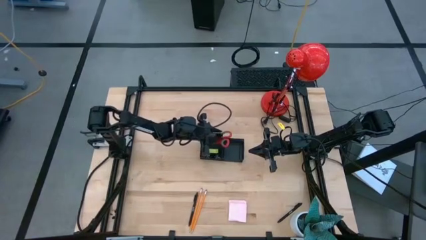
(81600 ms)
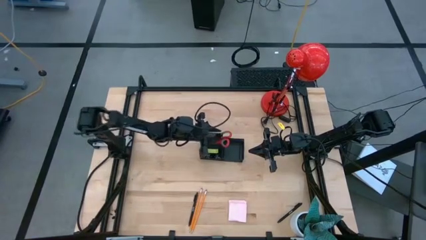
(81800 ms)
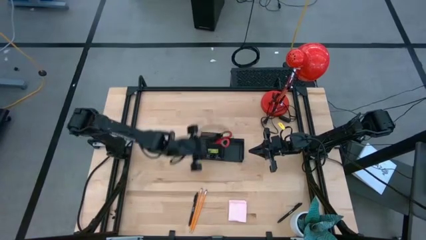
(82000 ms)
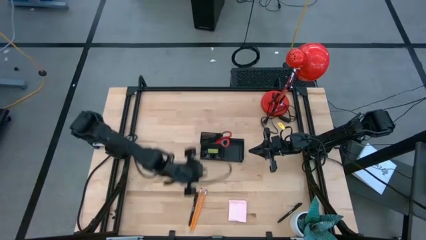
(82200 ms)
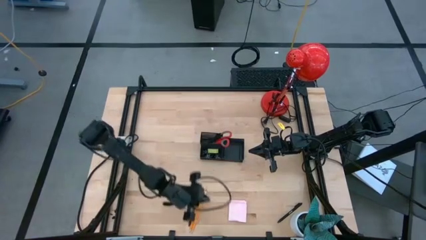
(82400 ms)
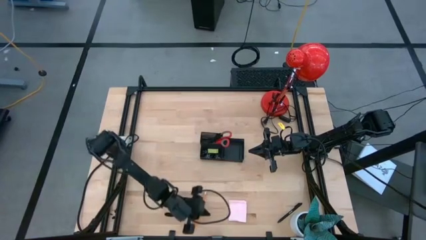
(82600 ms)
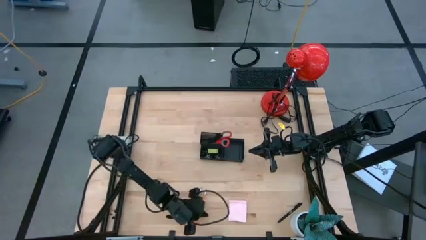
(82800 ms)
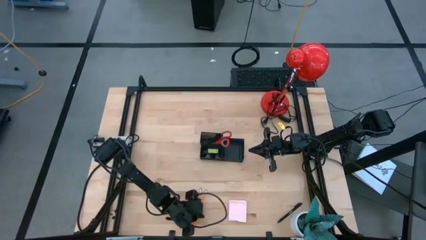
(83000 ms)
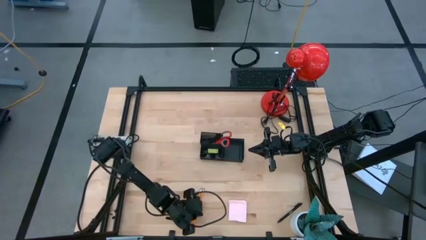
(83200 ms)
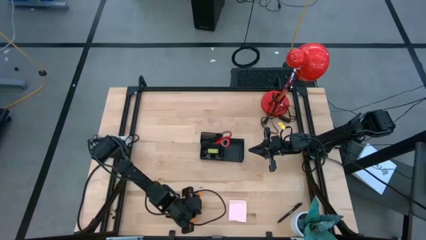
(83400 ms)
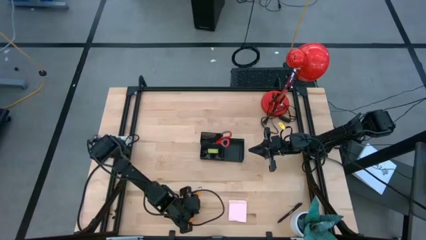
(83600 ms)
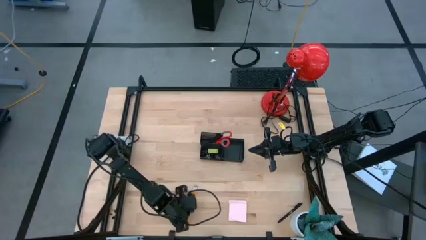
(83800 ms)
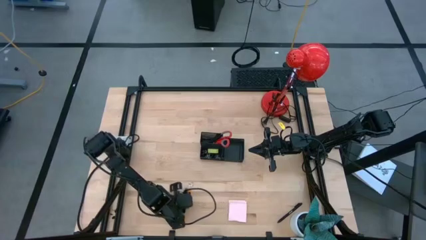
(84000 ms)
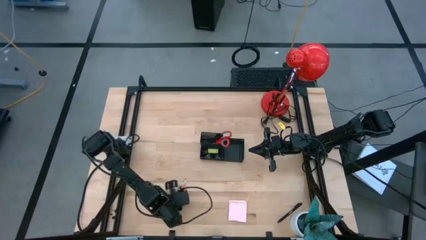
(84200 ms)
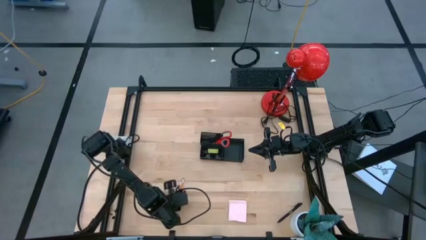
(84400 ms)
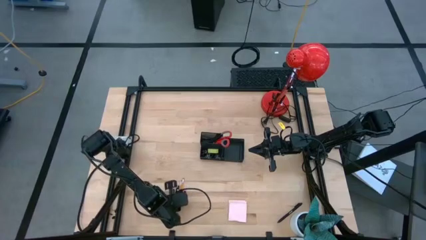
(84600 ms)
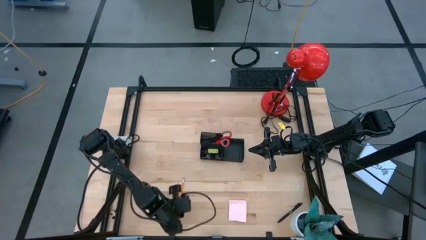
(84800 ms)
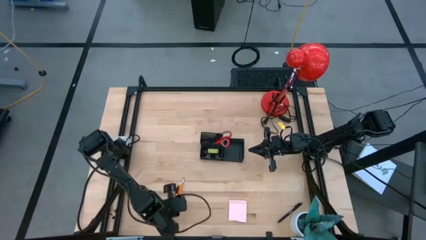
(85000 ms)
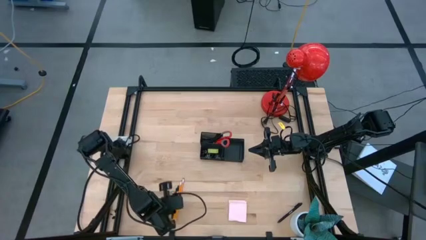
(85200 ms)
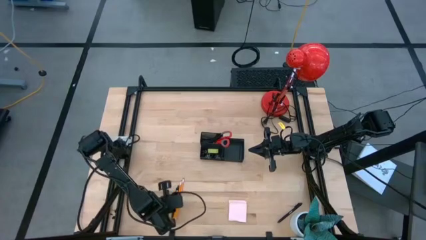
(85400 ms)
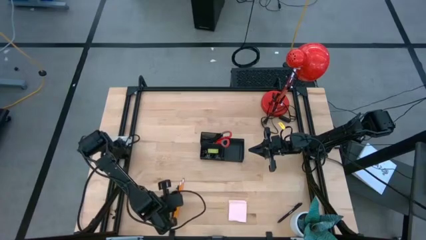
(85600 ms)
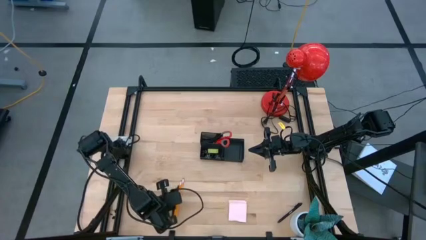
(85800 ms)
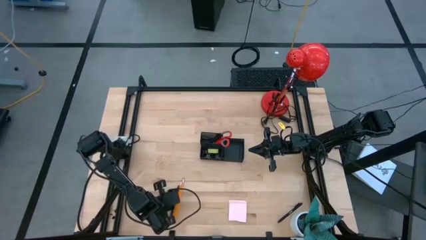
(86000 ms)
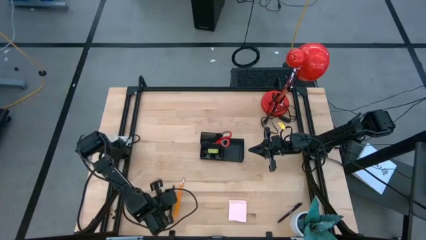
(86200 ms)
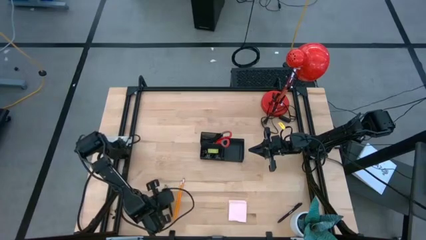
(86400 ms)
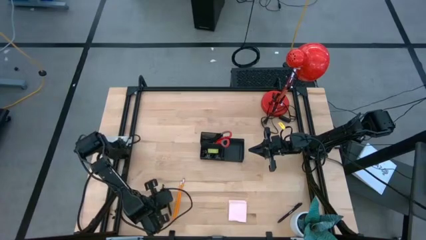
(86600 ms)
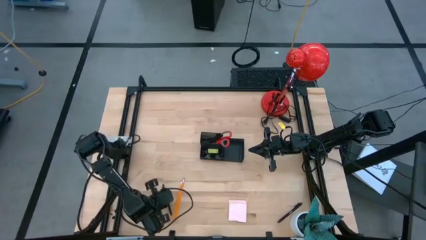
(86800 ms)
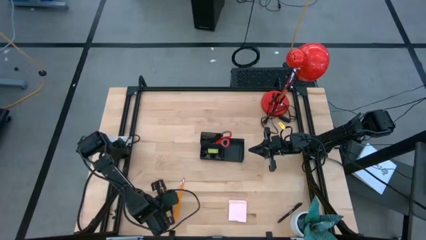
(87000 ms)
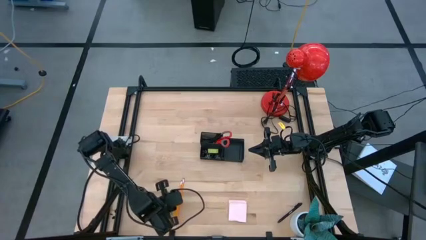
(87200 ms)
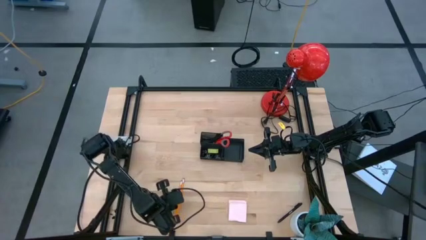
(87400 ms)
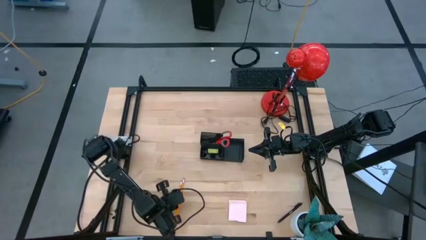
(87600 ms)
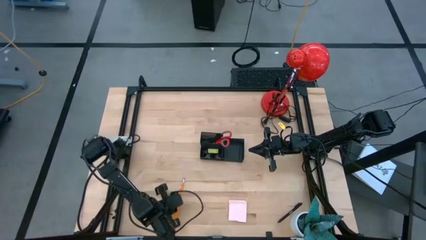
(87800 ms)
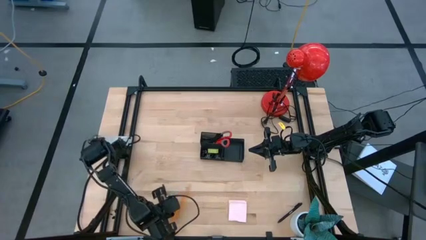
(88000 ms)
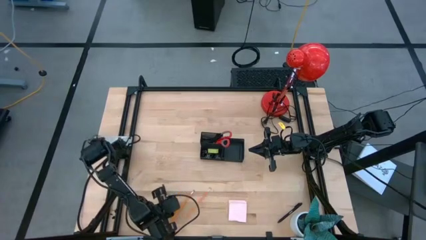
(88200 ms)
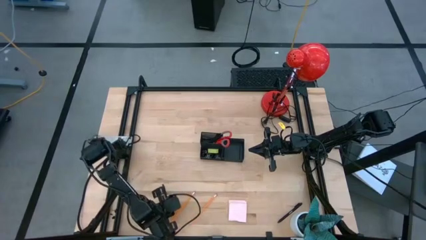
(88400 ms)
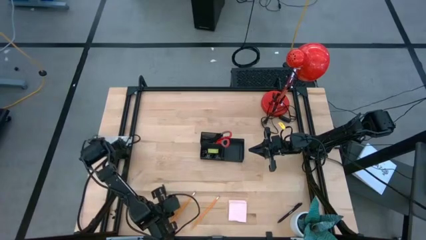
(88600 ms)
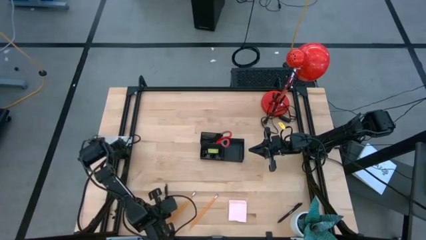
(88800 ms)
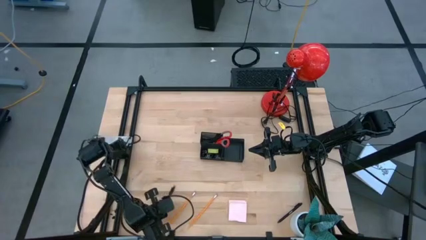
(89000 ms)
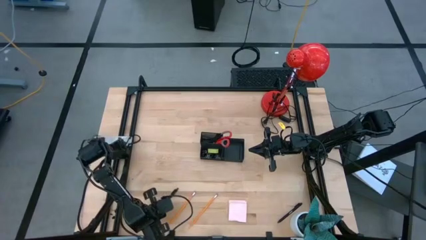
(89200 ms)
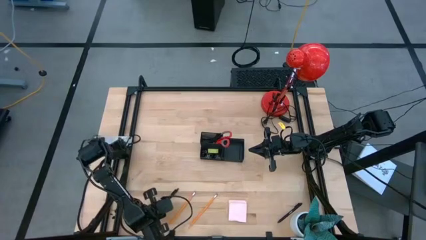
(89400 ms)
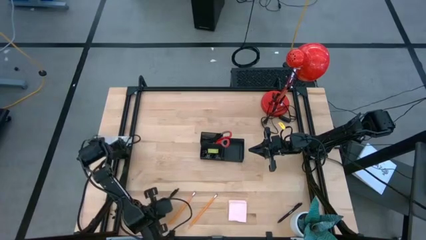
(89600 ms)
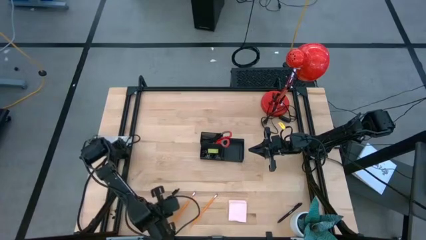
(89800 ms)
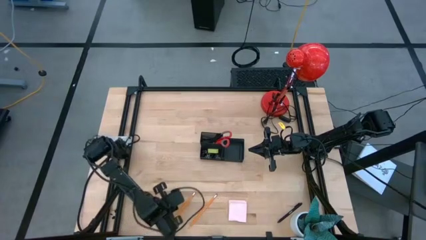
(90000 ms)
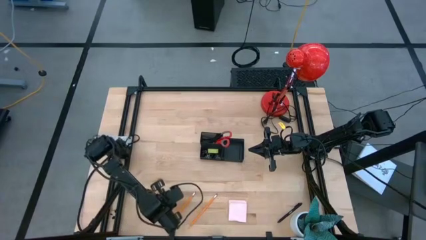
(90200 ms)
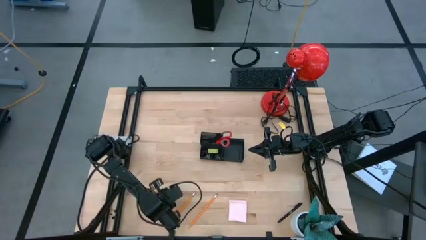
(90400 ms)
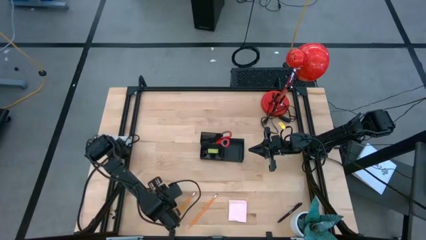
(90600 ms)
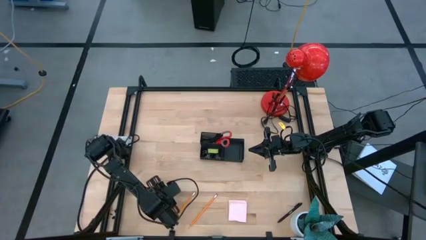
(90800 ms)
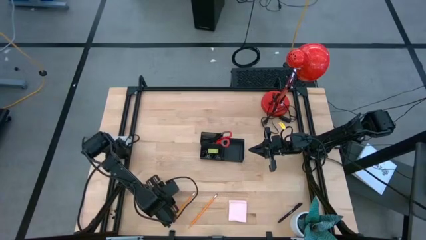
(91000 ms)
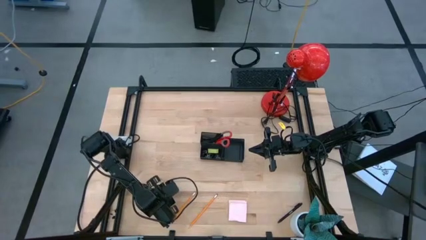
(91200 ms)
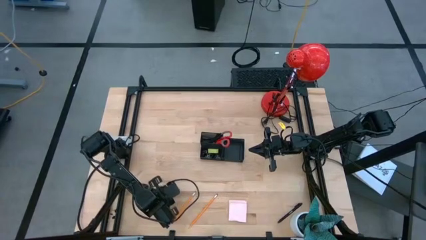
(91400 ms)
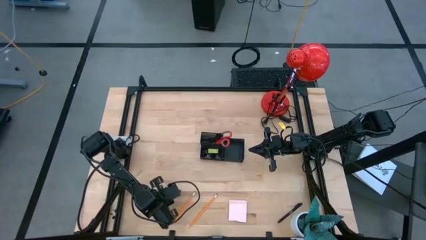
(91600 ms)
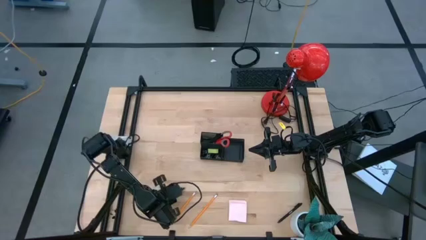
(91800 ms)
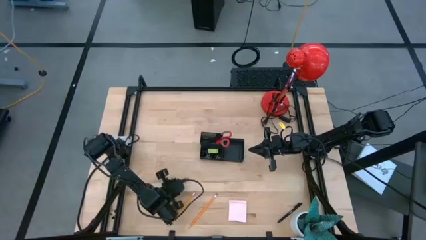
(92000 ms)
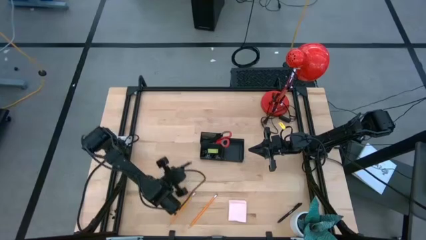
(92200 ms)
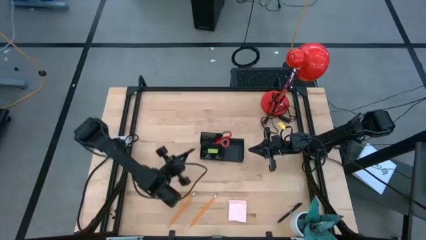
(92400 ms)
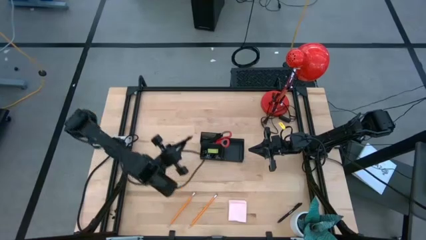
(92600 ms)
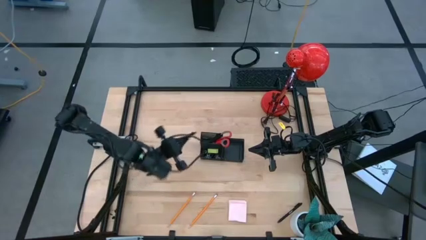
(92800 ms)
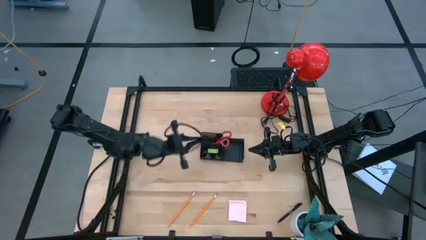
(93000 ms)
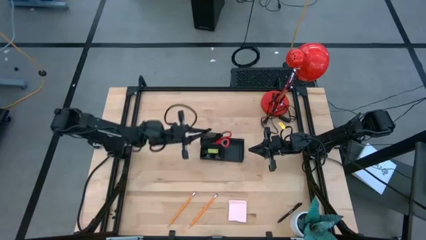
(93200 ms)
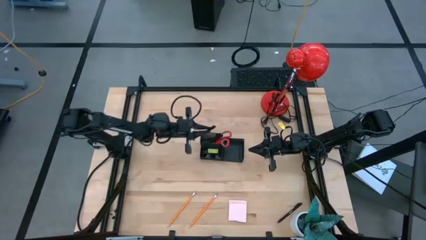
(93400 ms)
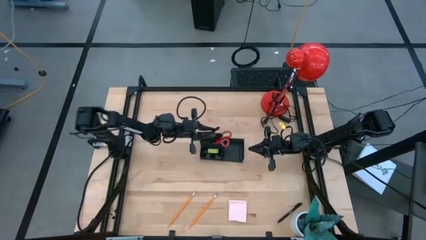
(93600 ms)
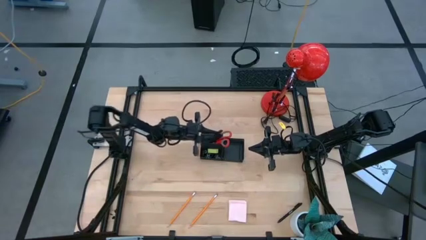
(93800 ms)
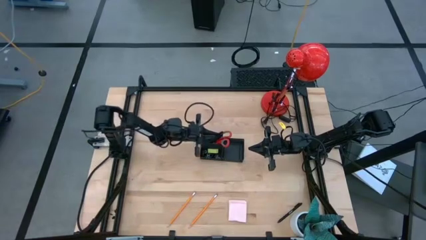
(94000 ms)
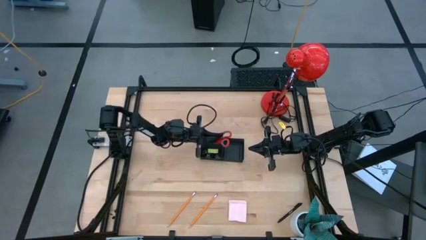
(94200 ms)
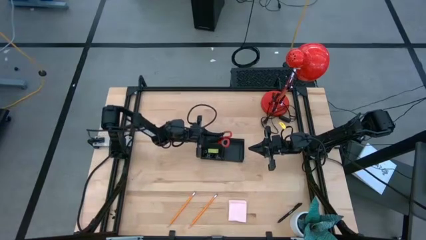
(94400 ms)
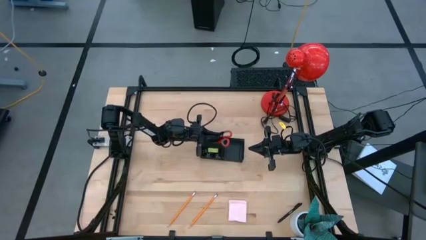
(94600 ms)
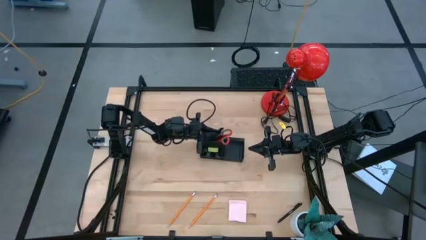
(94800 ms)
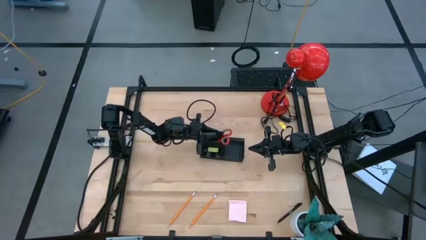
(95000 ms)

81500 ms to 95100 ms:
Task: Pick and place office supplies into organizer
Put the black pen into the black desk organizer

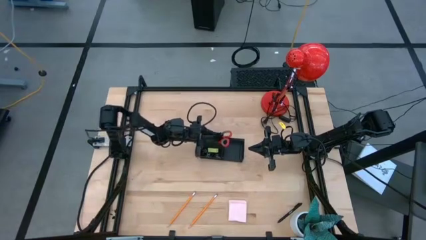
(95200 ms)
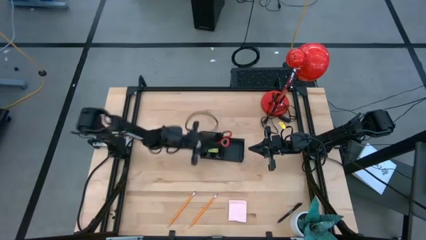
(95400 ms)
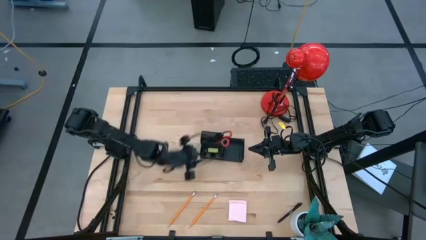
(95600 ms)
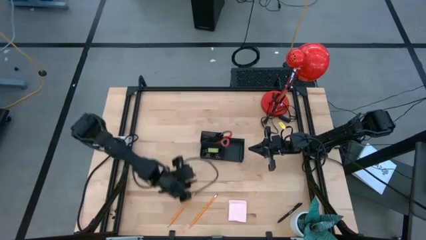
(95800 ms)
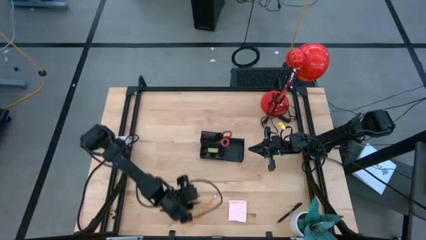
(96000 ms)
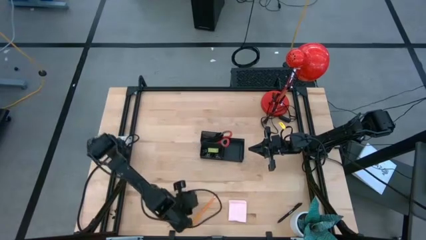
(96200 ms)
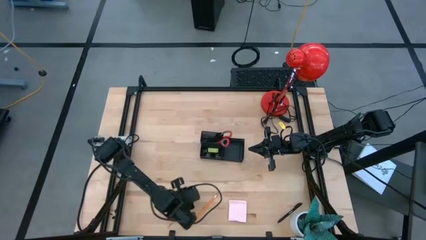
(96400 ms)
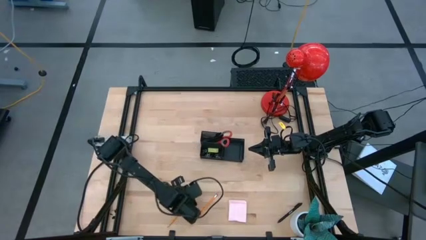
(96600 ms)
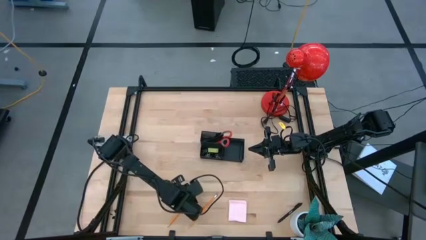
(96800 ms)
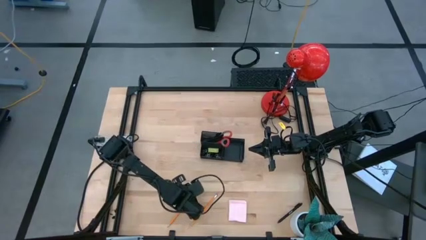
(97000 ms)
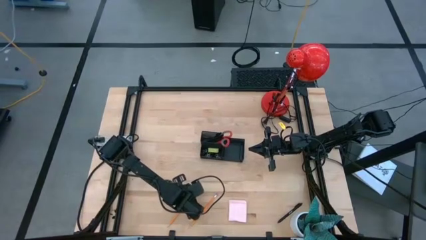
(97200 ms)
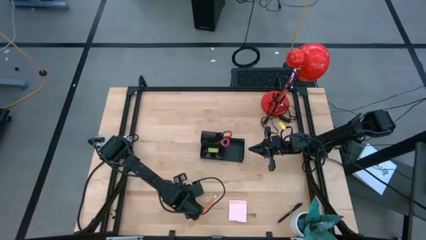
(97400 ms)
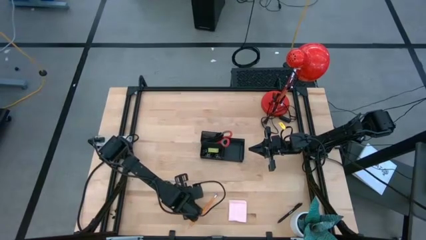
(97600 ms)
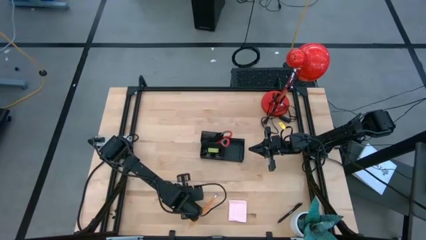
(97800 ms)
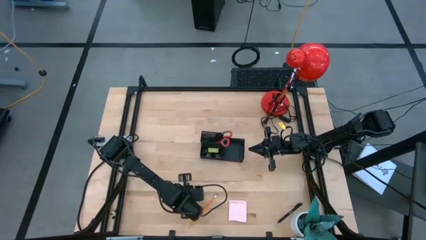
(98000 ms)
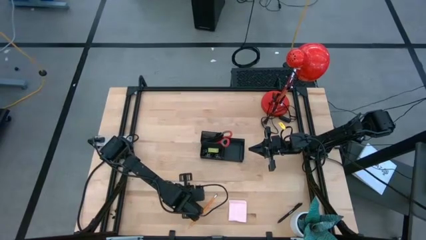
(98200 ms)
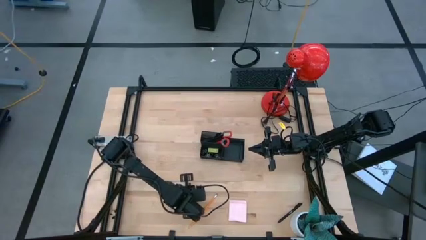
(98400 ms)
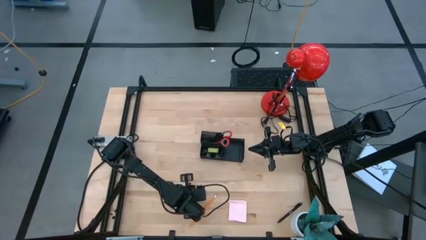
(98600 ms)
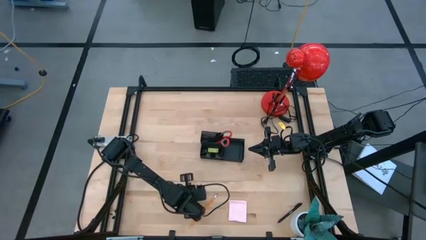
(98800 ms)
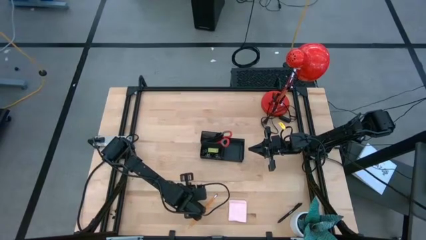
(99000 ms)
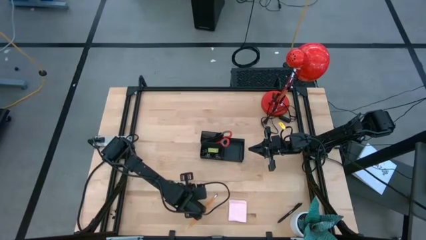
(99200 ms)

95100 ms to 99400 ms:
Put the yellow pencil into the black desk organizer
